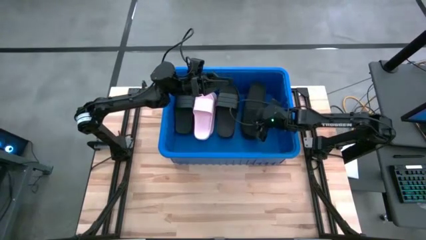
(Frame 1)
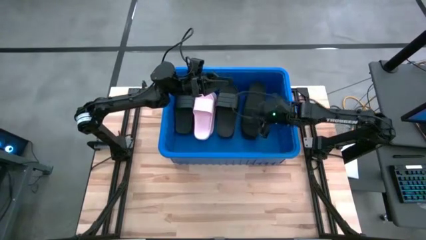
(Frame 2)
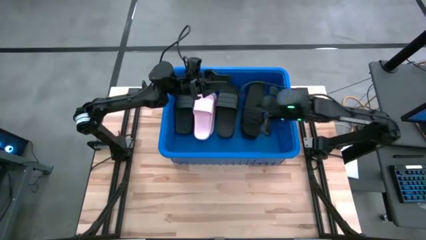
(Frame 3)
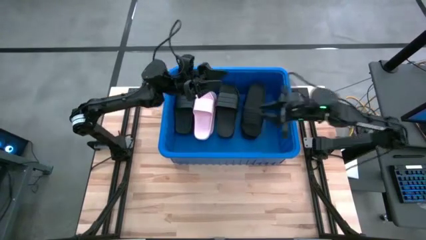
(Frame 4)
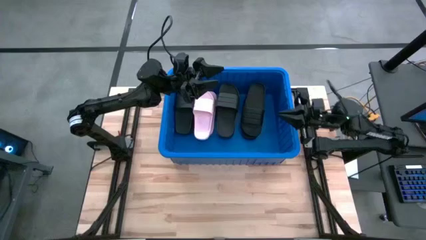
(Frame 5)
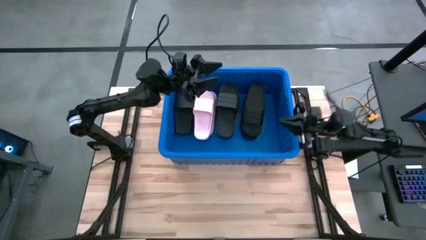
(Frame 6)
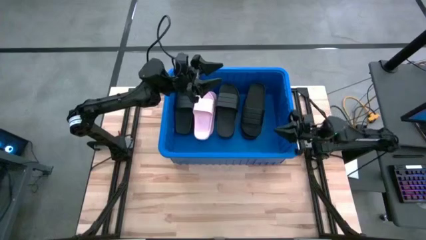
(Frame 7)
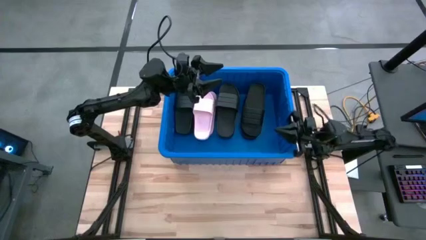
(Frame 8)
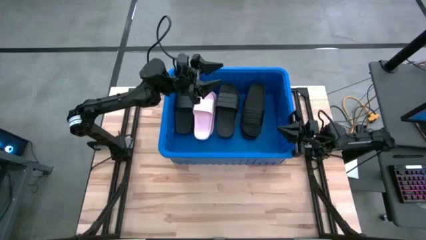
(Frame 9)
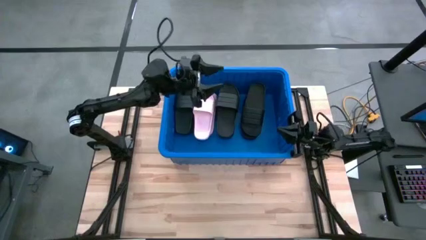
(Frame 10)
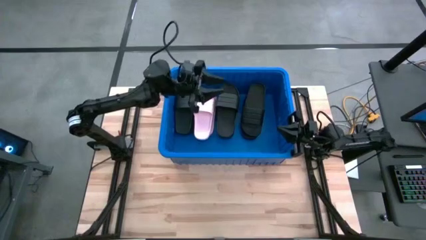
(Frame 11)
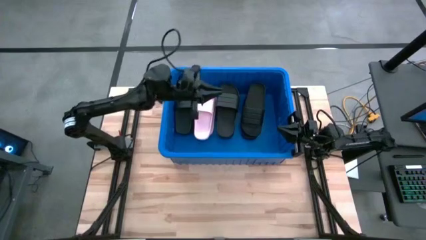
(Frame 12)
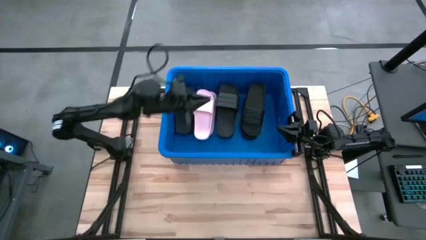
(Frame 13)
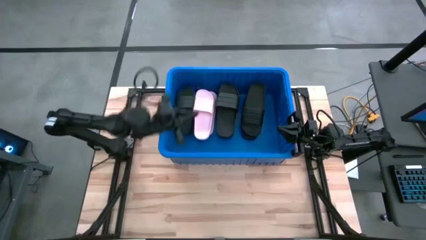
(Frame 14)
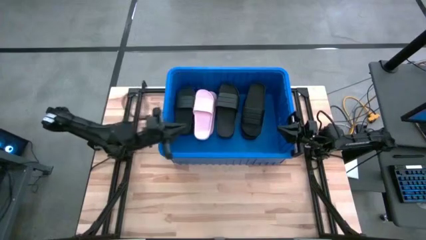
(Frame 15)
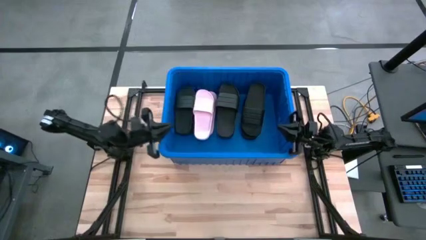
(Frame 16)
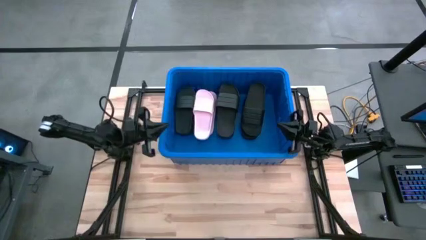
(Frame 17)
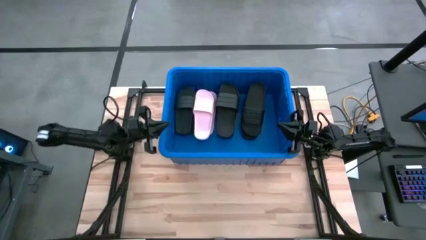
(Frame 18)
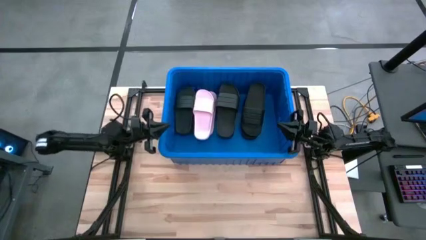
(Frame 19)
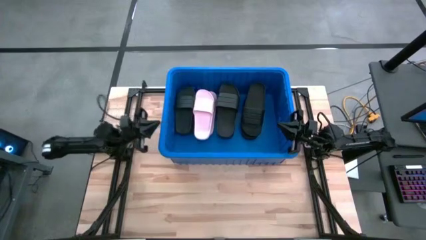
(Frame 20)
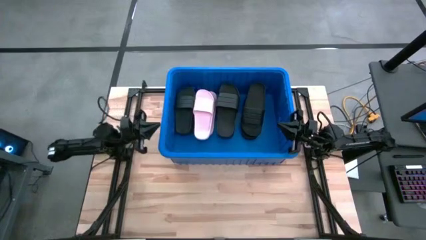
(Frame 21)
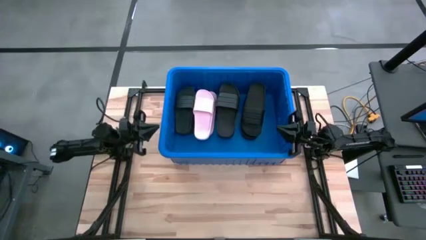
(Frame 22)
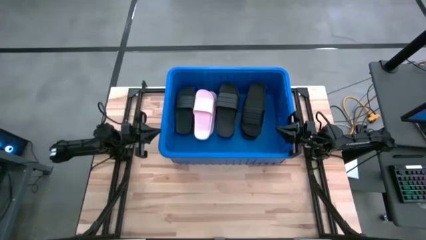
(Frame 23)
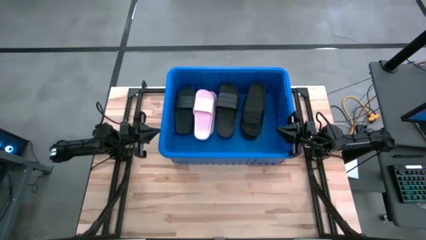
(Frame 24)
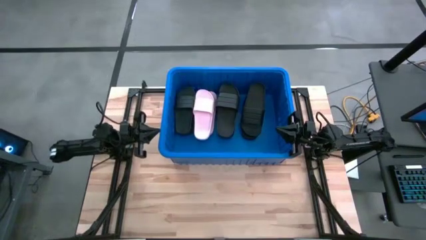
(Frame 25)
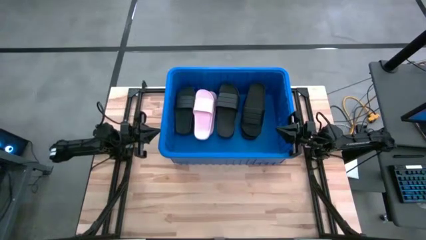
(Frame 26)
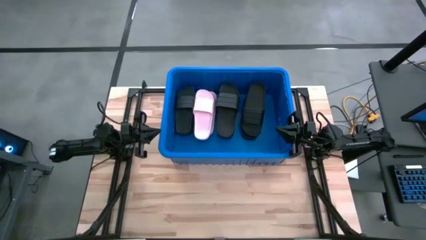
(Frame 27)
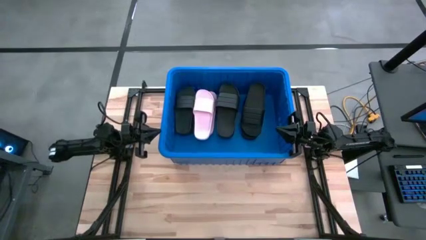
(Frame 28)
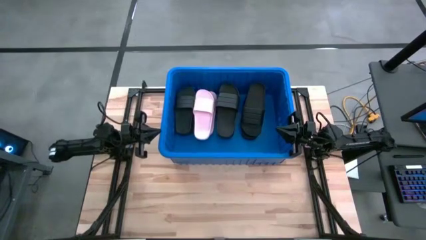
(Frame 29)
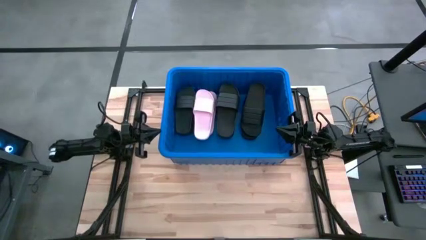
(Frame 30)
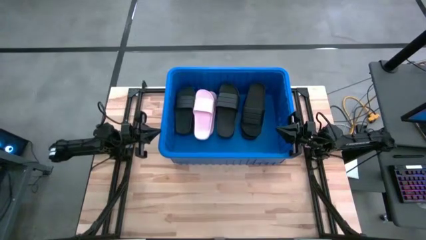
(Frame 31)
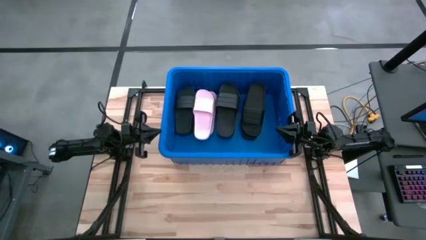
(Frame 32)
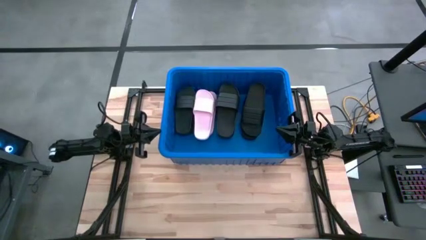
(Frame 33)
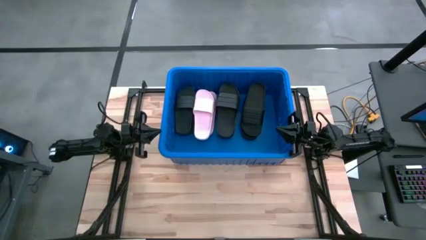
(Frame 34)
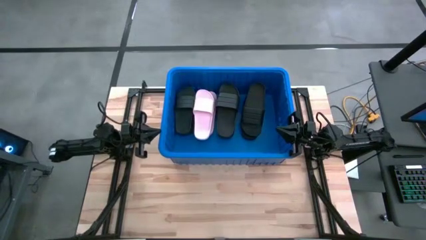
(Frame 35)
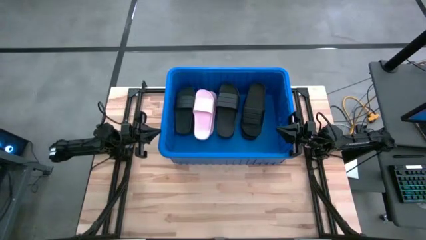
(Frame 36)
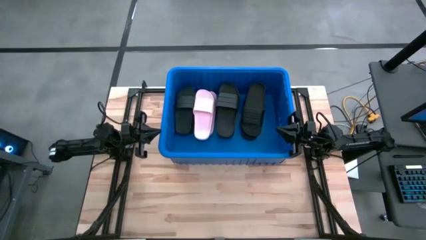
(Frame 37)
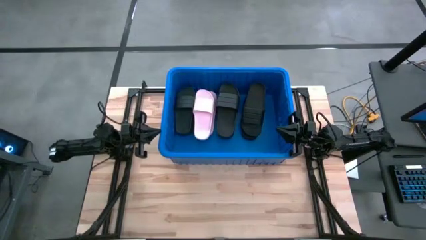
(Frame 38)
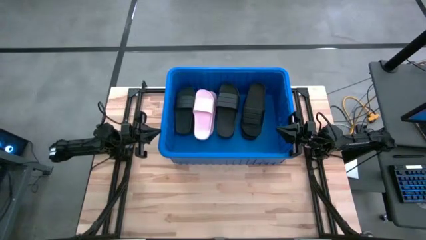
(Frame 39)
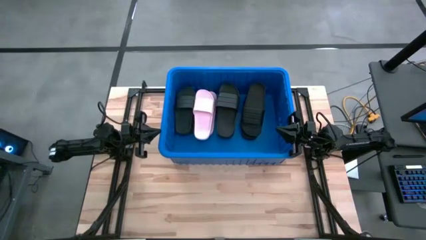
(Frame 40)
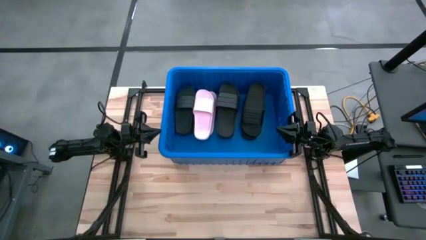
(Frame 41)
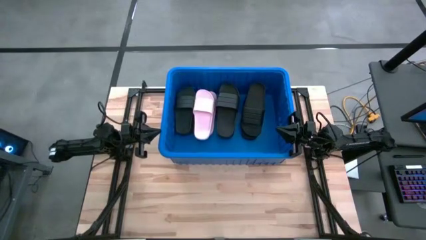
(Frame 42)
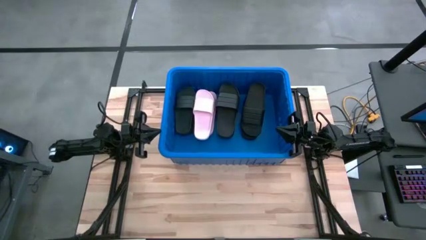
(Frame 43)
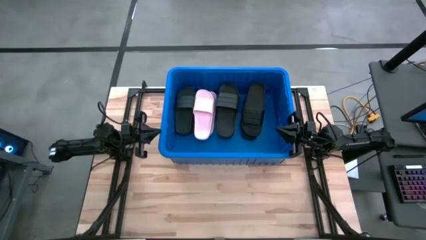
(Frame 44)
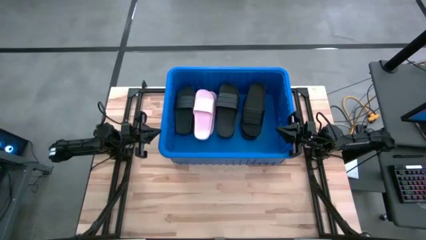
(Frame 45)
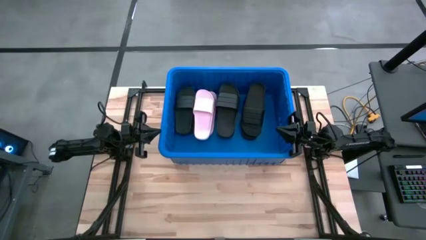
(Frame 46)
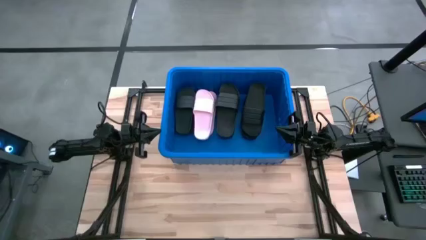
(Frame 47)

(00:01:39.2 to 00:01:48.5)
Task: Pick and place slides into bin
Return to Home Position

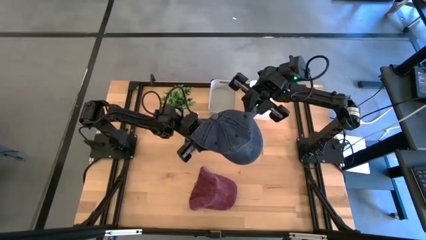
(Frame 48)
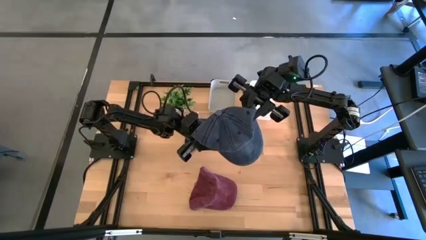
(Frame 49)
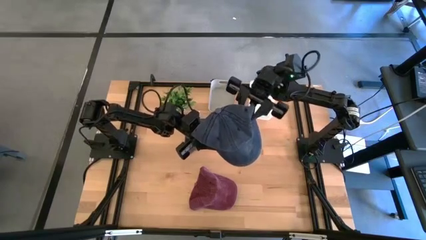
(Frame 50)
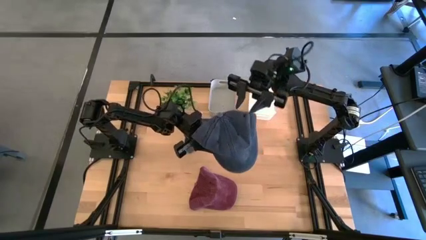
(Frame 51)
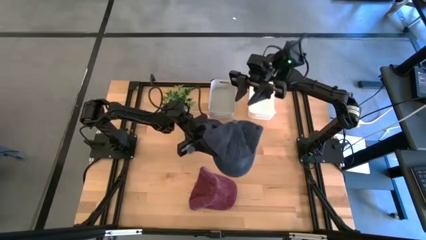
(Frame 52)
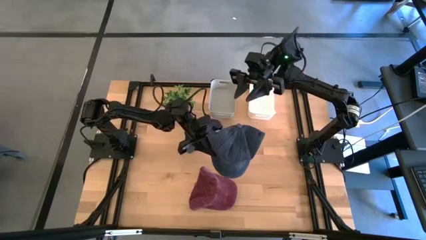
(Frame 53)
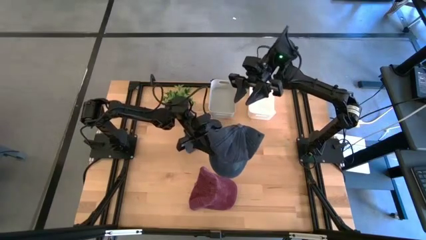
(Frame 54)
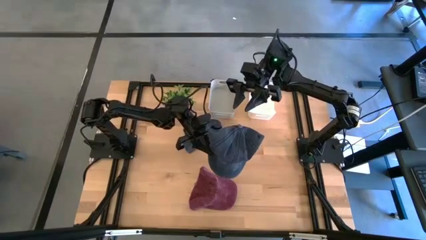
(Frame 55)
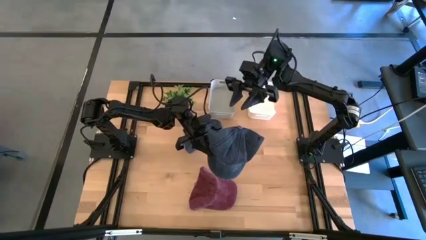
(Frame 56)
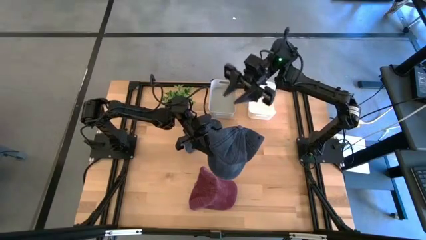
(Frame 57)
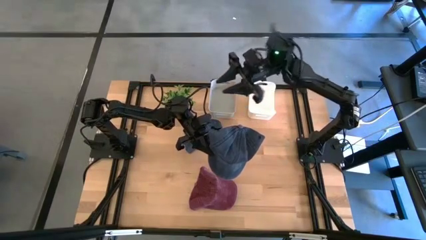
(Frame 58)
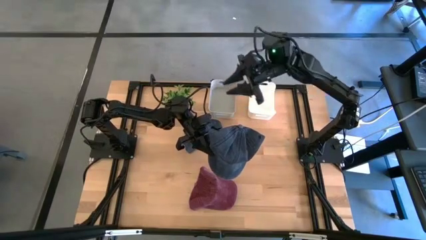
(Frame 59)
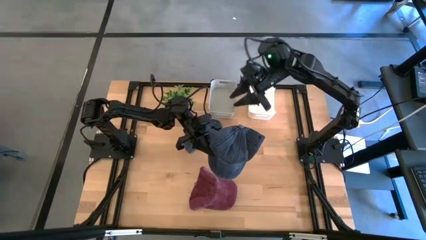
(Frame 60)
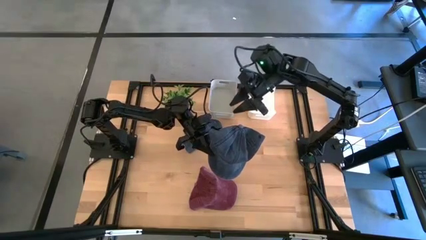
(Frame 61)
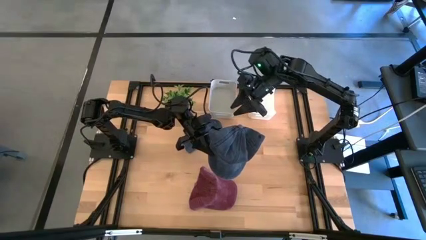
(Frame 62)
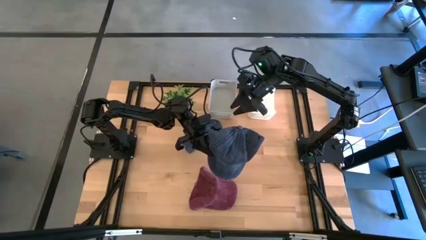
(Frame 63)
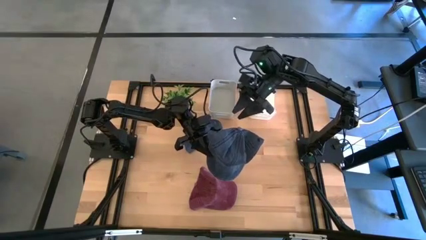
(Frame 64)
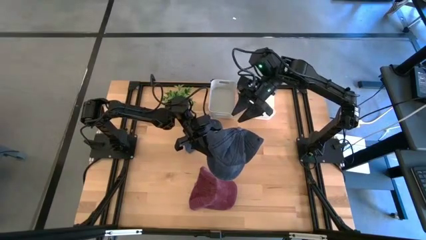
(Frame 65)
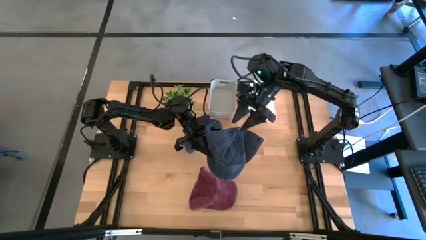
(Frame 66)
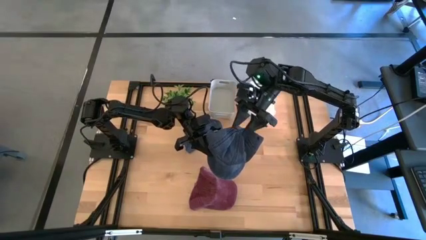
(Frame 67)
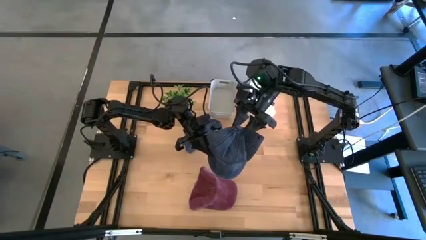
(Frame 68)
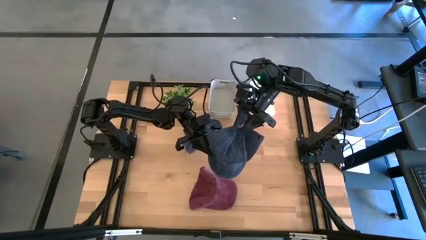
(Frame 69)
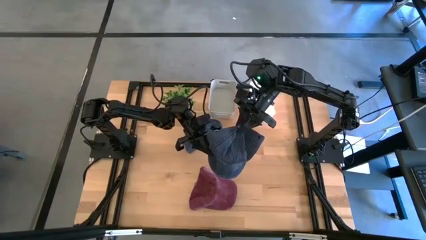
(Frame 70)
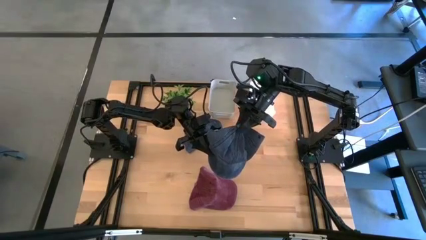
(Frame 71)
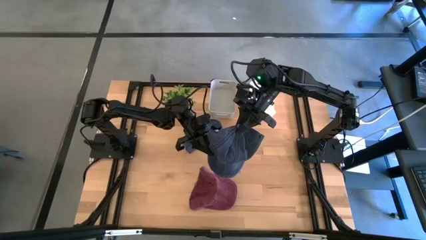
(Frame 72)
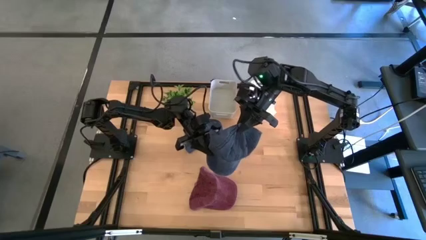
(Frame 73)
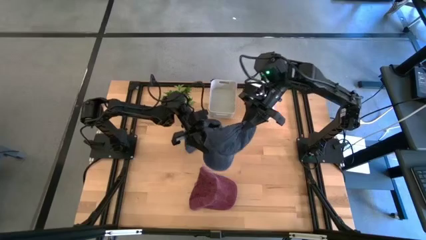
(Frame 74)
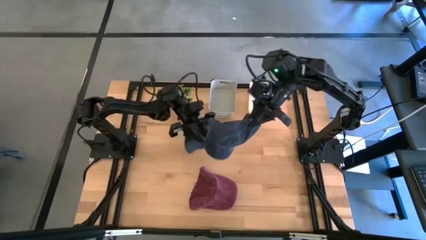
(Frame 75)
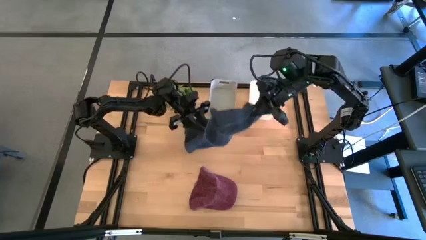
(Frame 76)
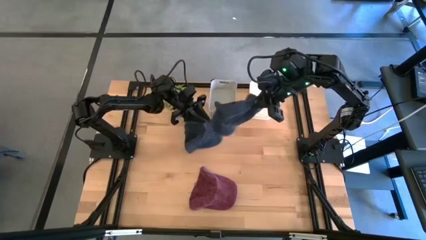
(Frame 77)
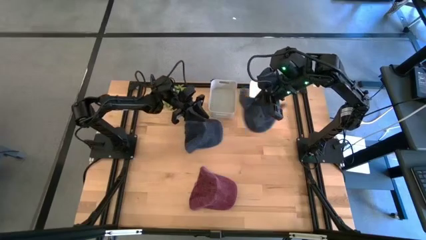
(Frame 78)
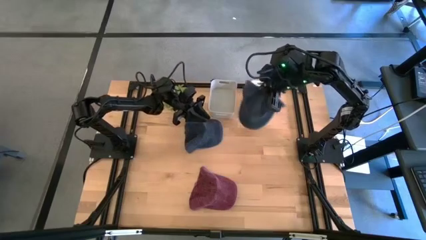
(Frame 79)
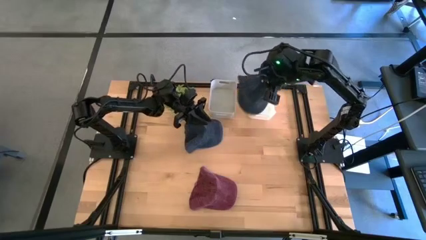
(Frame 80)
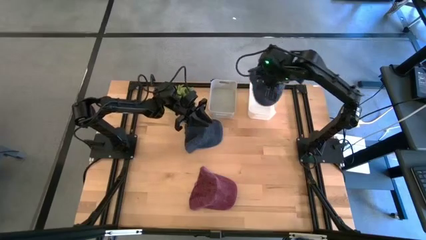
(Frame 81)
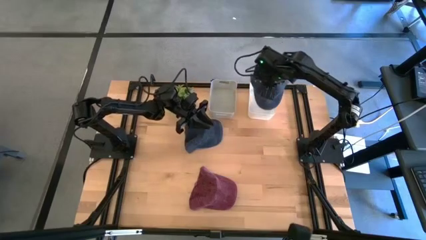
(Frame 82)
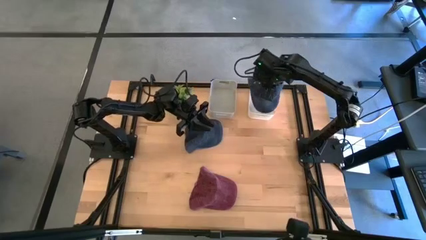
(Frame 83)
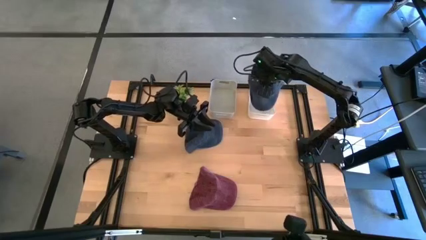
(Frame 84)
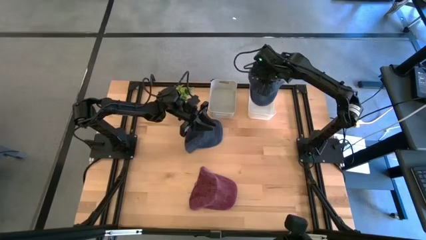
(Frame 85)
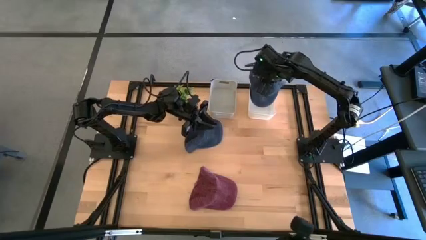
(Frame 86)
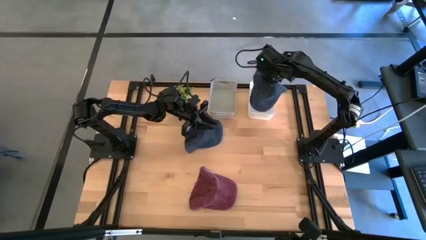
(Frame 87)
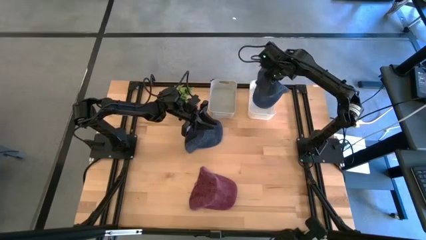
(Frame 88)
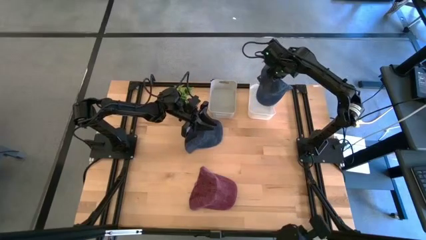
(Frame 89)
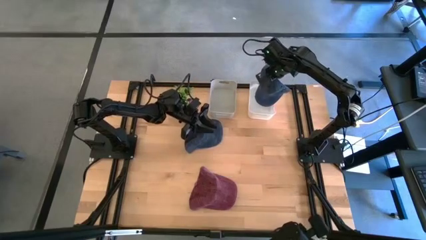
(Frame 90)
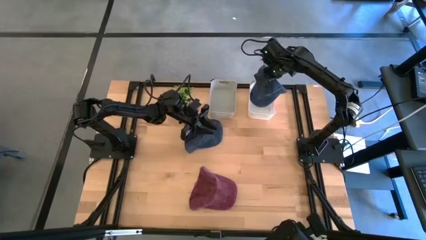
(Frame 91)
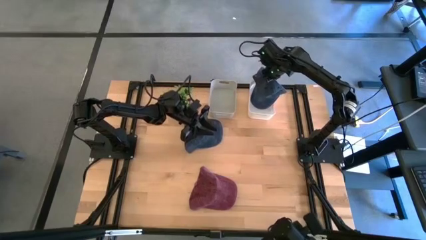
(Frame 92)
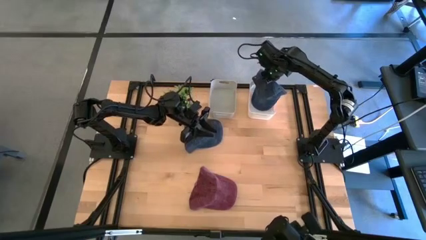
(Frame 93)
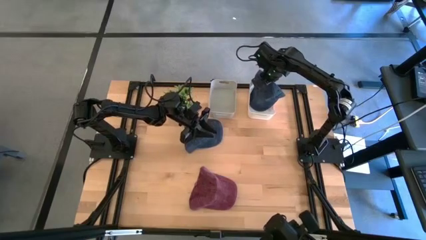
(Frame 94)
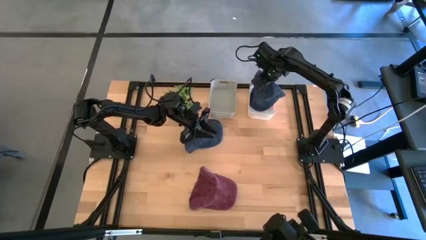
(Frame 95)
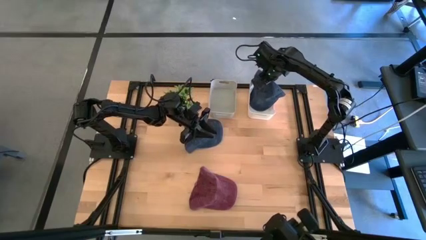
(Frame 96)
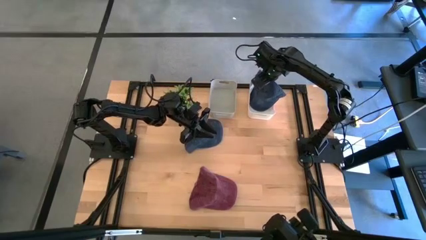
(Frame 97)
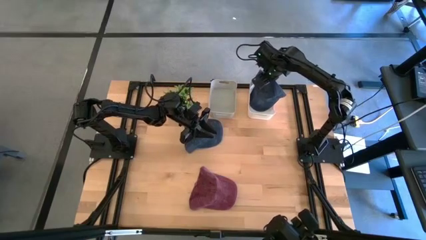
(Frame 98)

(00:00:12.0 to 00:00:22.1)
Task: Pick & Place hat
Put the right blue cap into the white bin
